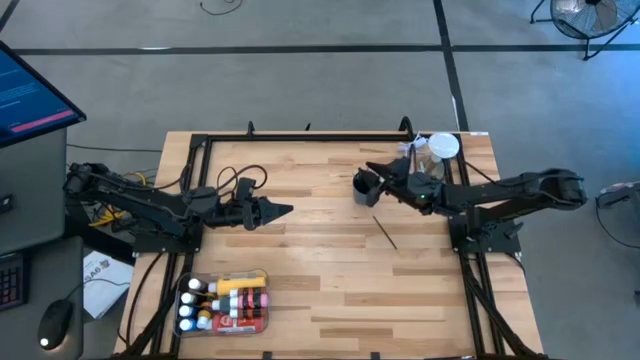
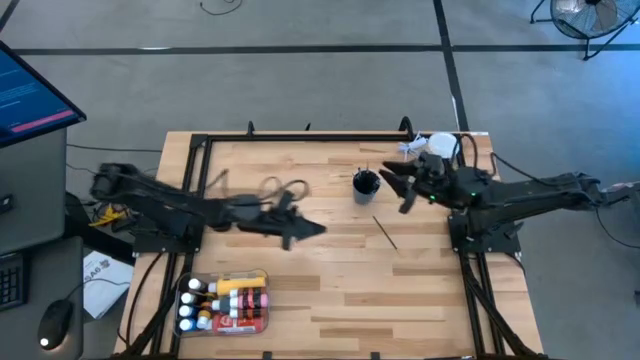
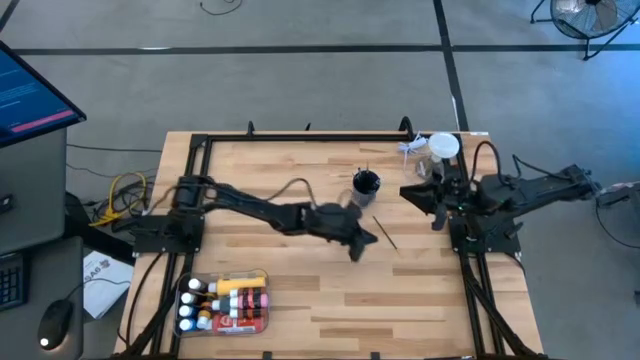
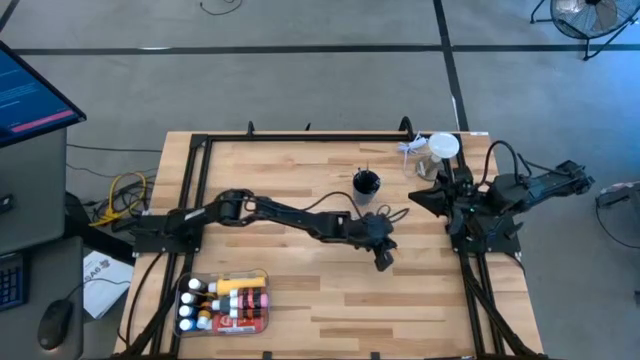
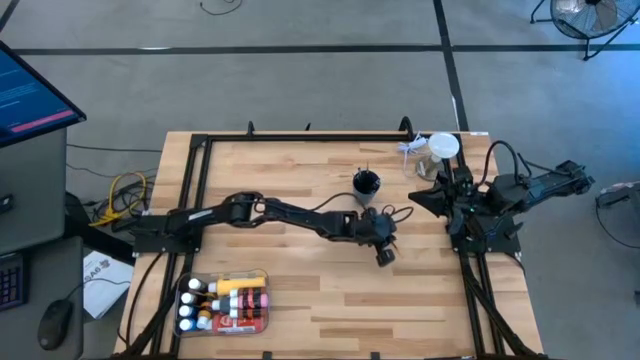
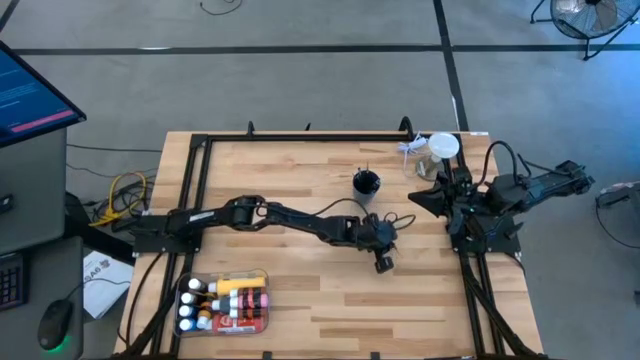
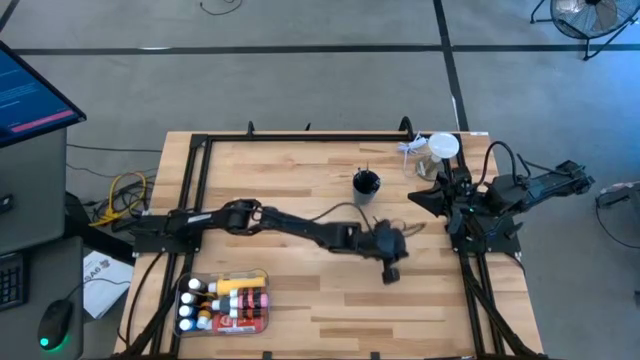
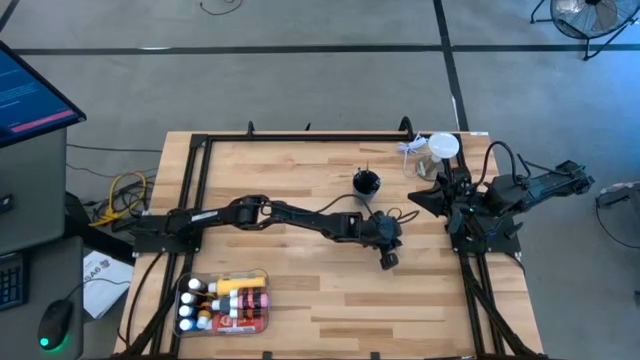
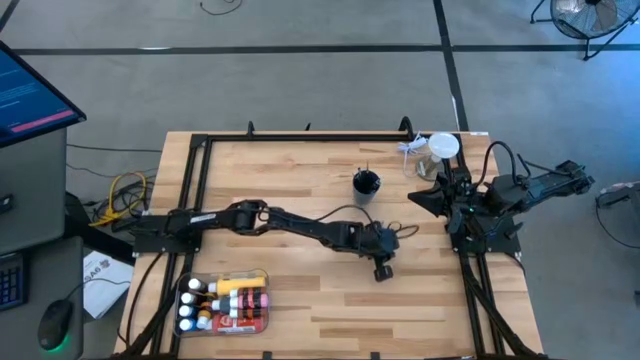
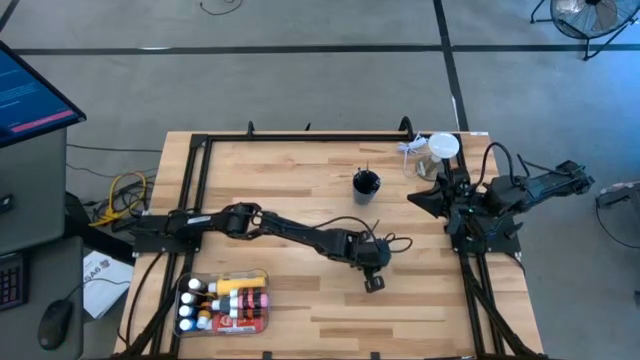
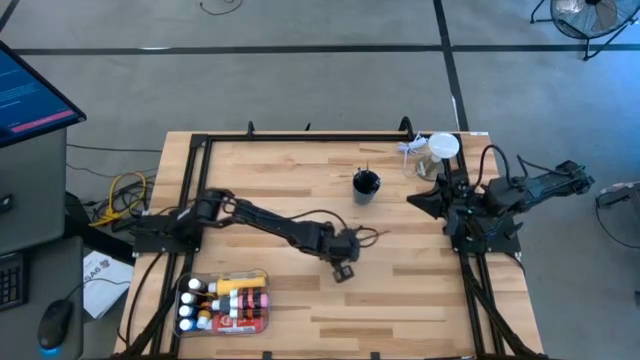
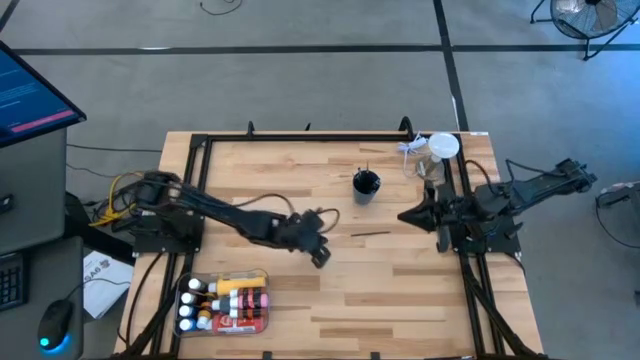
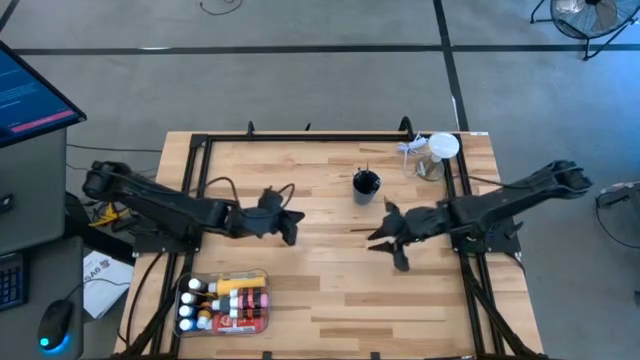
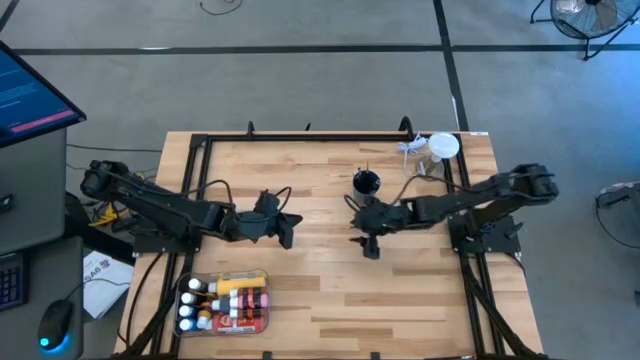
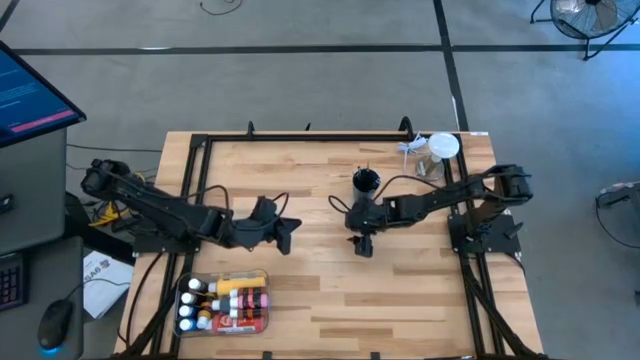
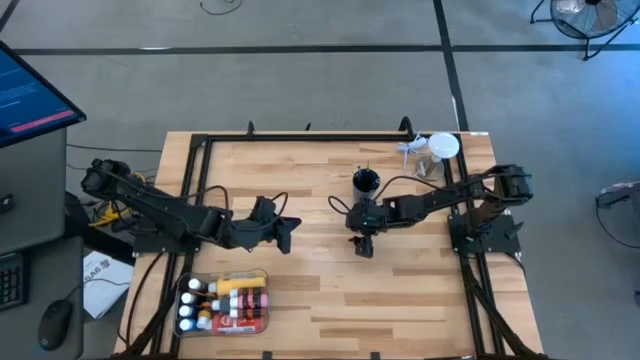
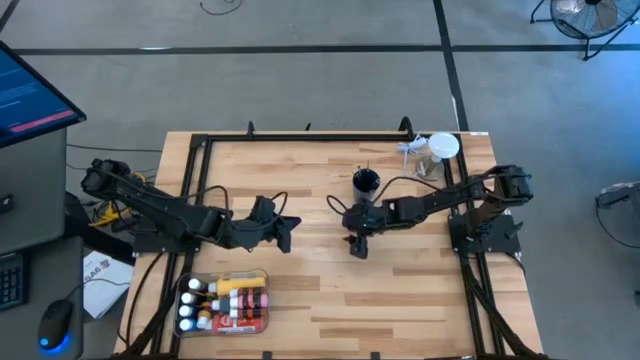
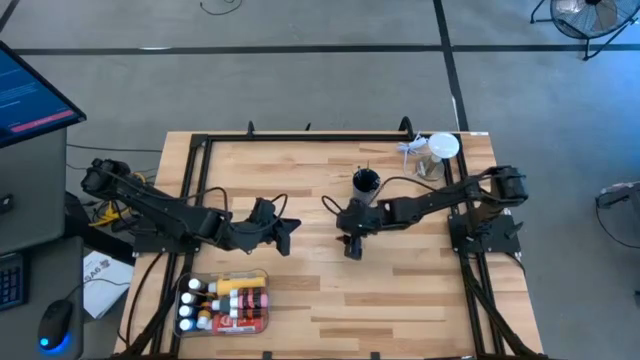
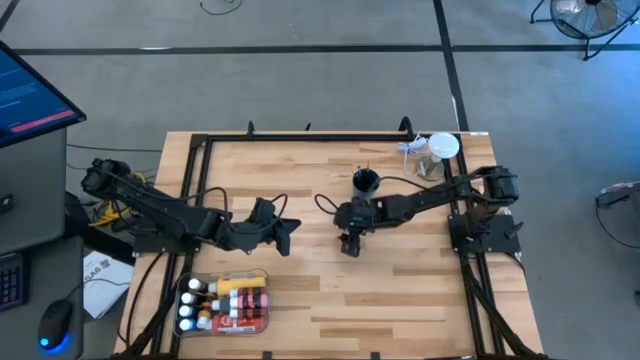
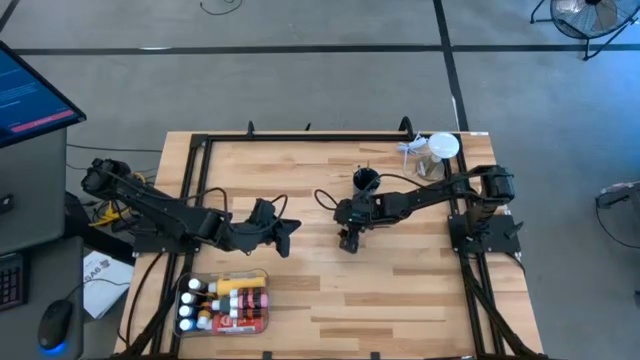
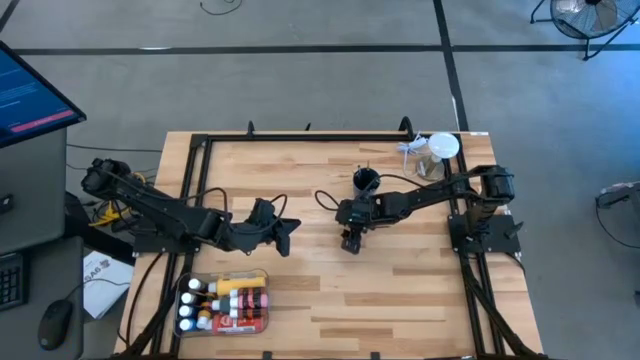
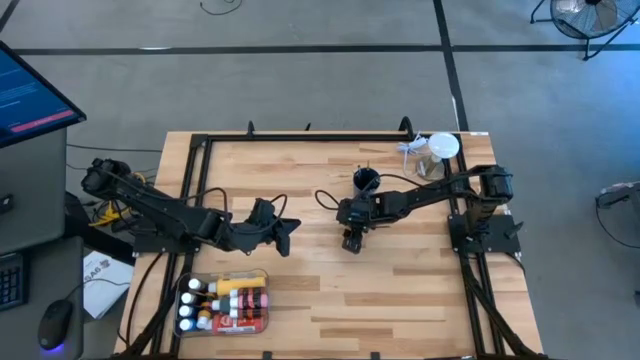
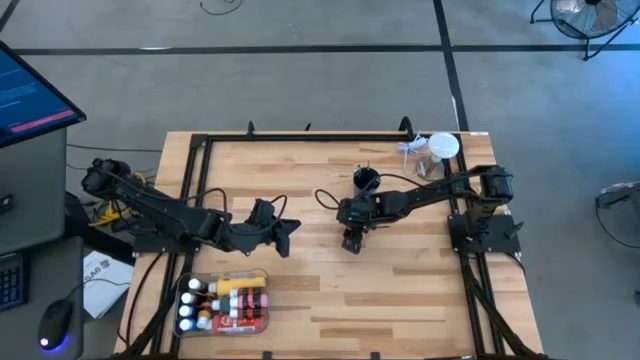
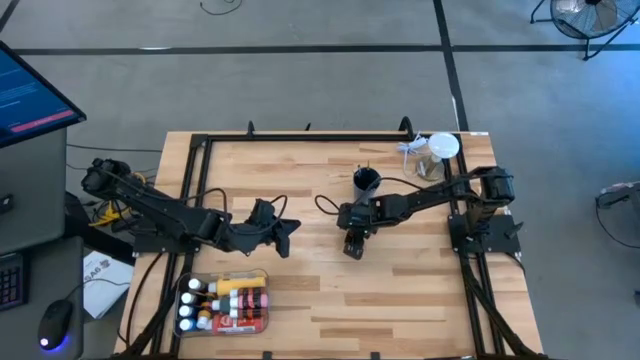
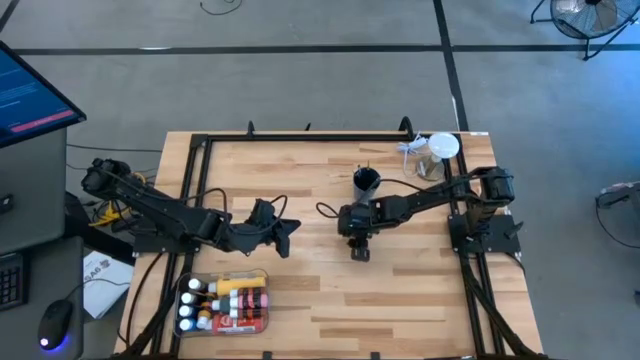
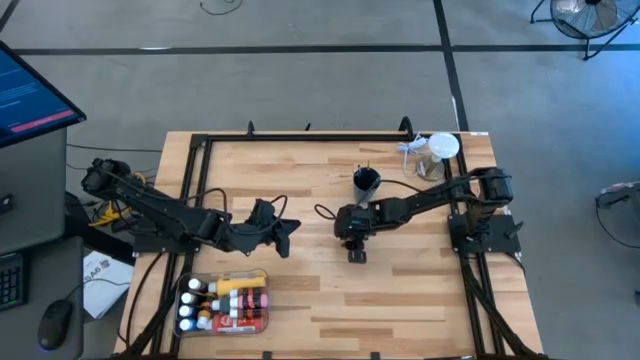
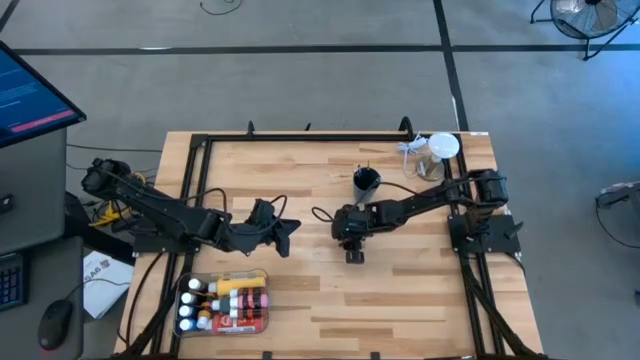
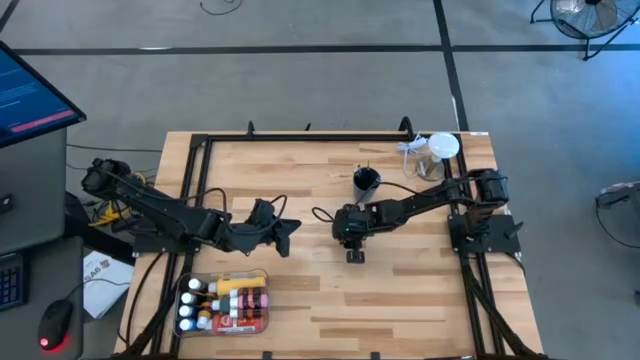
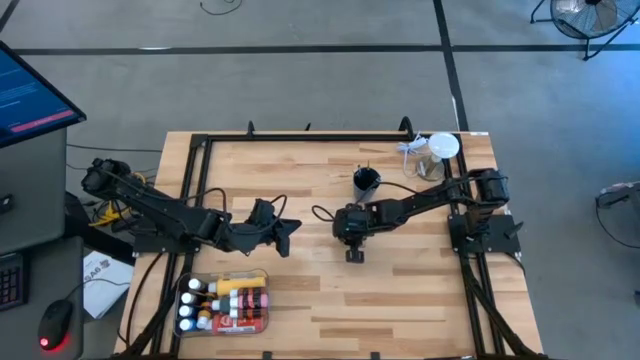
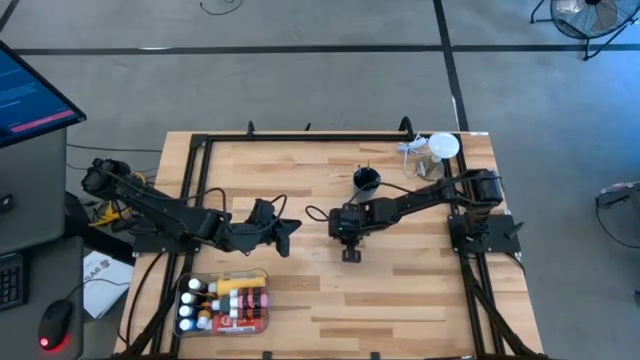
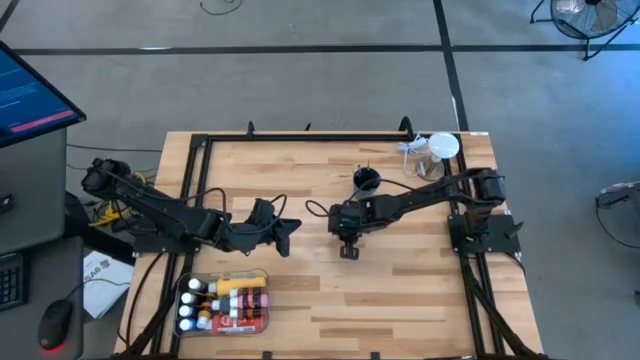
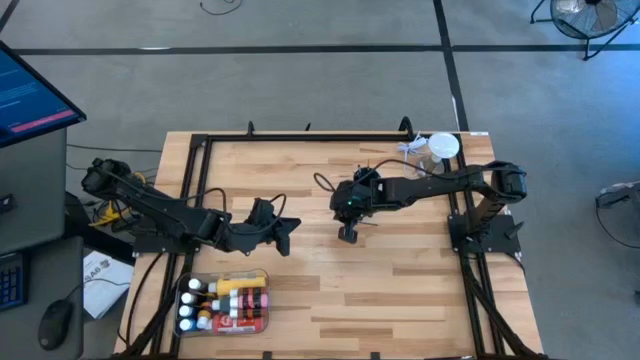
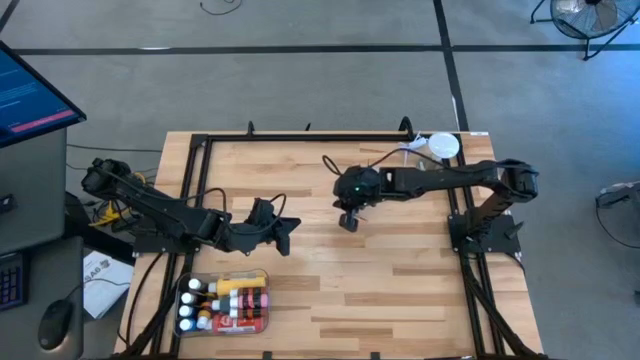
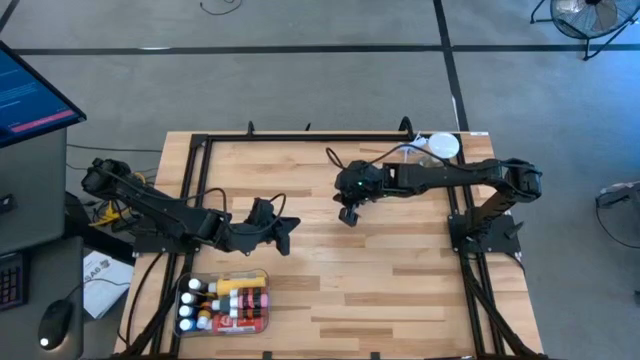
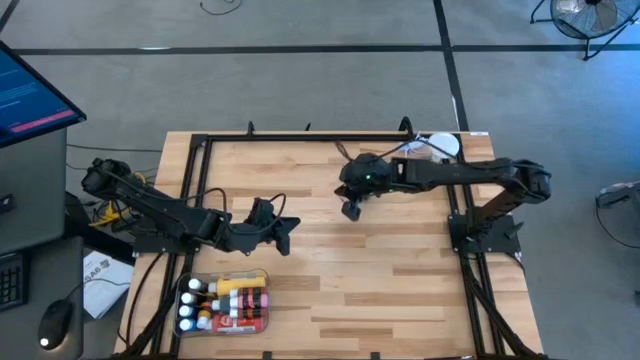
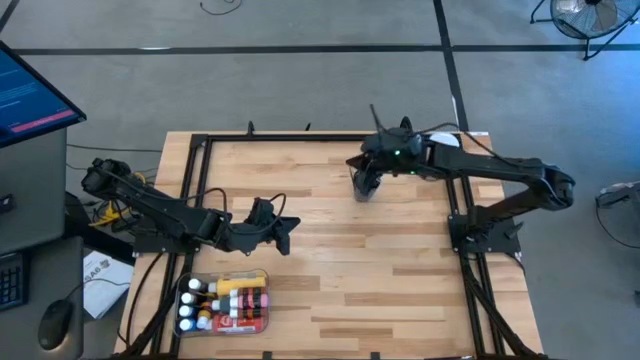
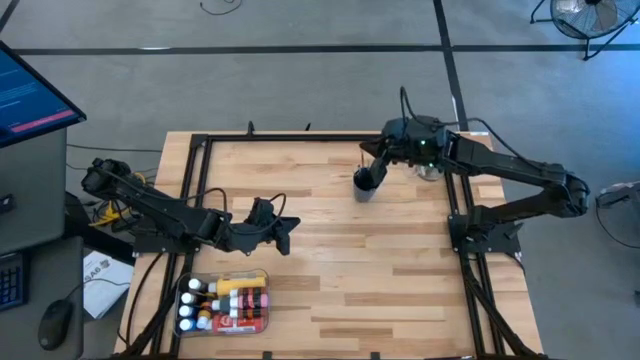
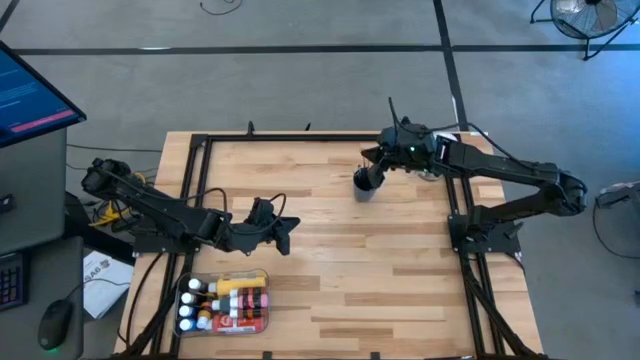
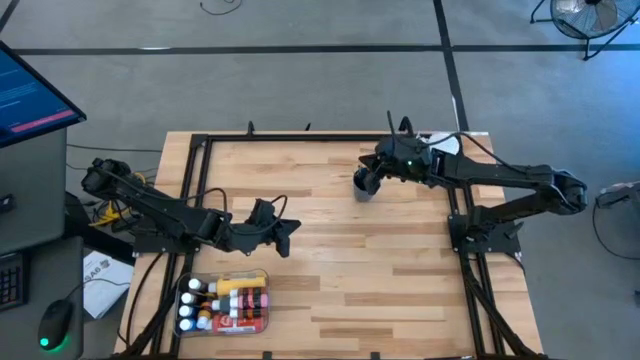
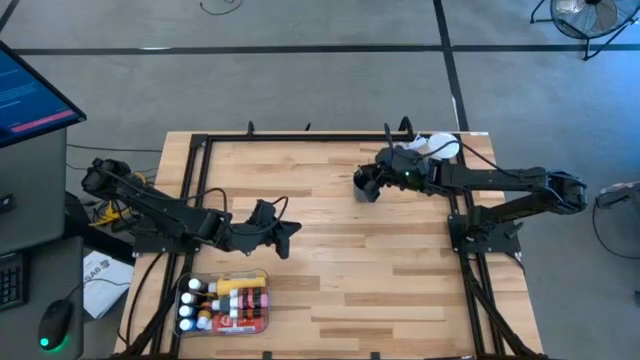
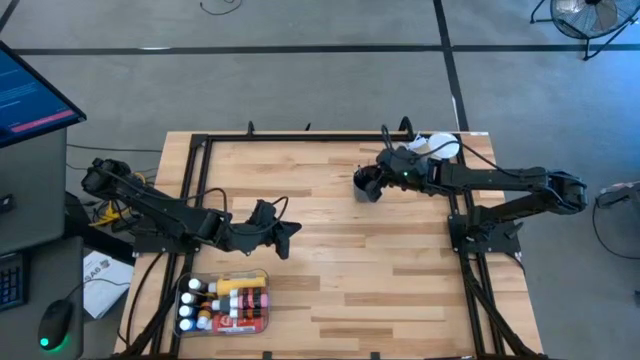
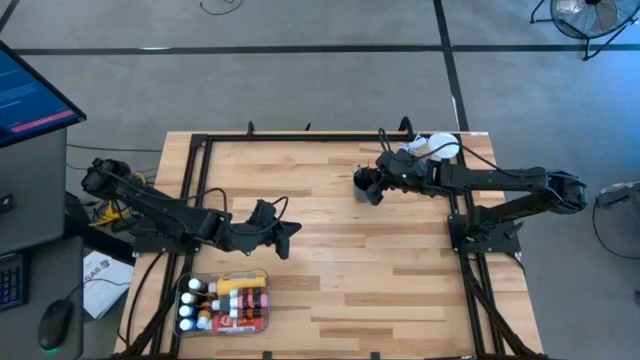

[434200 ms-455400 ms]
Task: Pick & Place Paint Supplies
Put the paint brush into the blue cup
